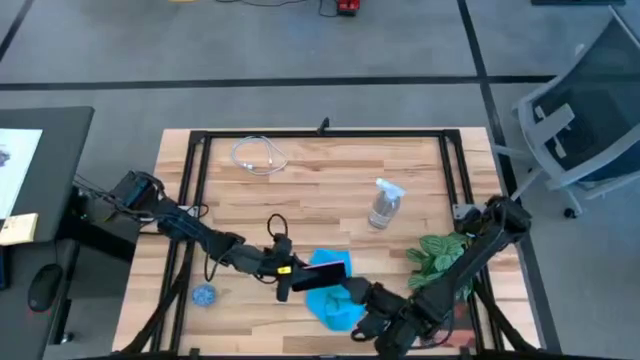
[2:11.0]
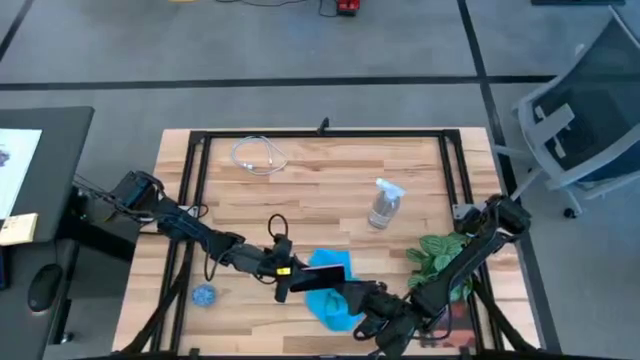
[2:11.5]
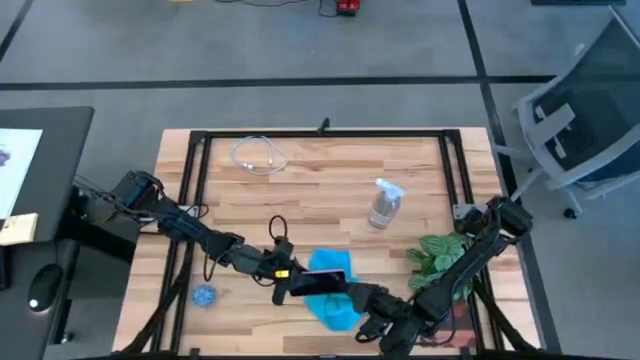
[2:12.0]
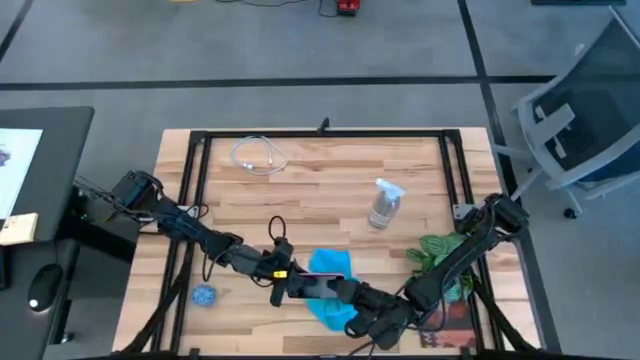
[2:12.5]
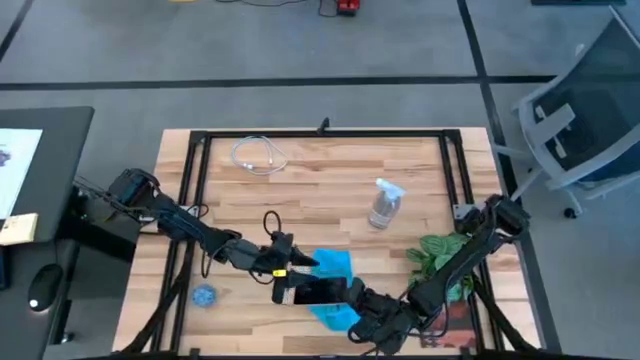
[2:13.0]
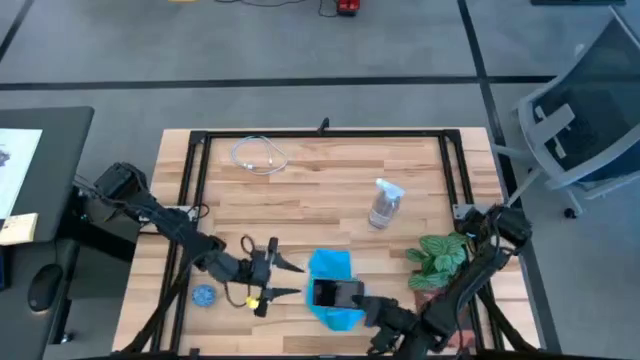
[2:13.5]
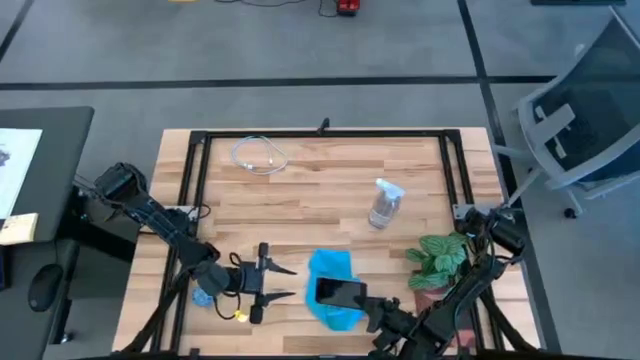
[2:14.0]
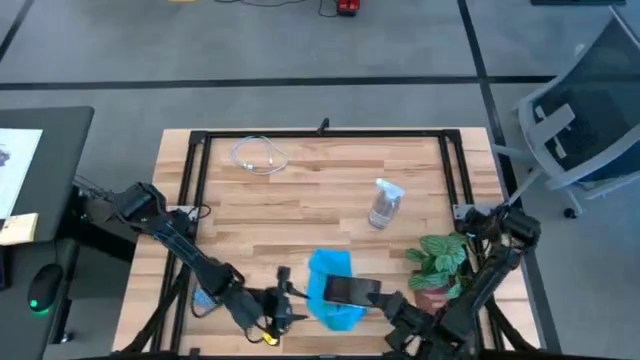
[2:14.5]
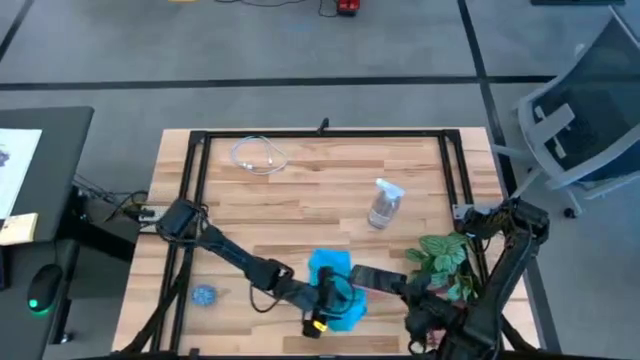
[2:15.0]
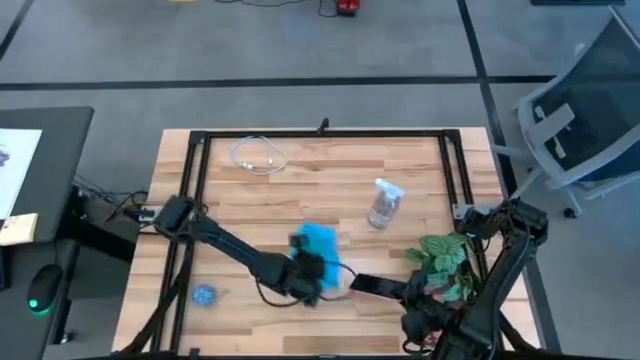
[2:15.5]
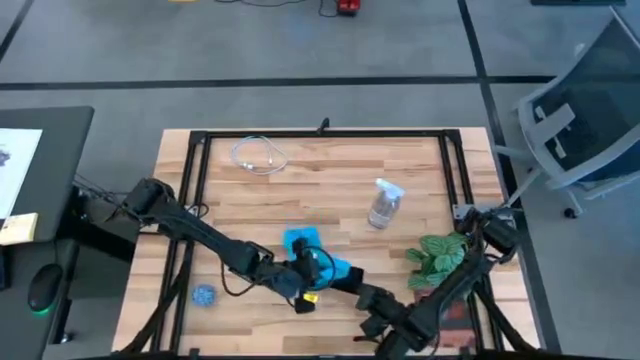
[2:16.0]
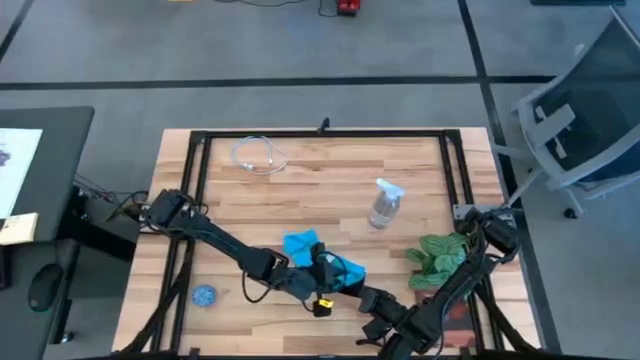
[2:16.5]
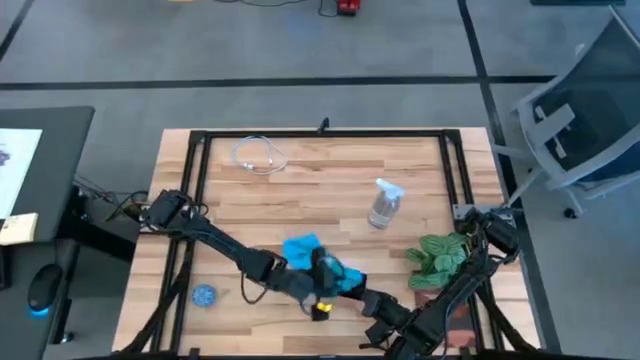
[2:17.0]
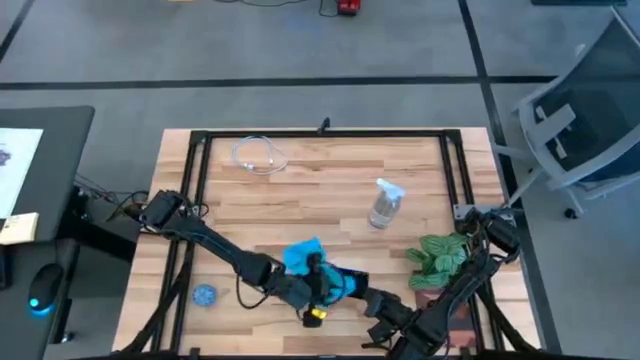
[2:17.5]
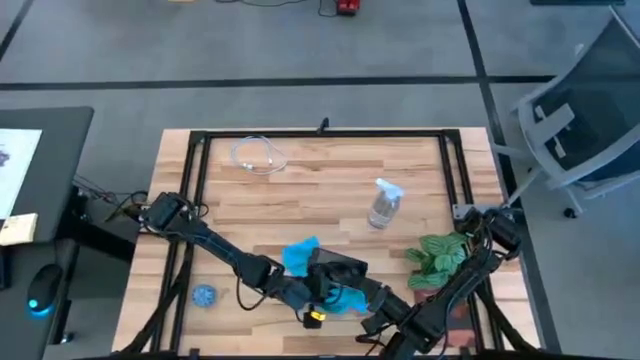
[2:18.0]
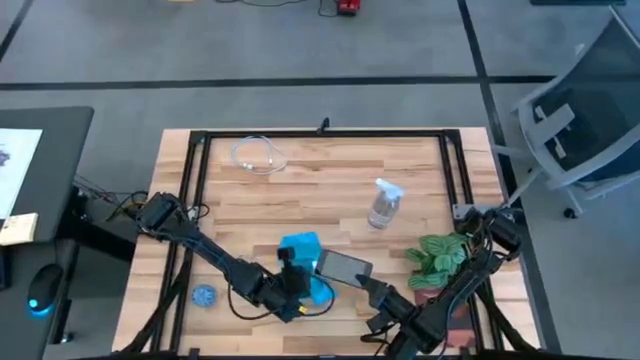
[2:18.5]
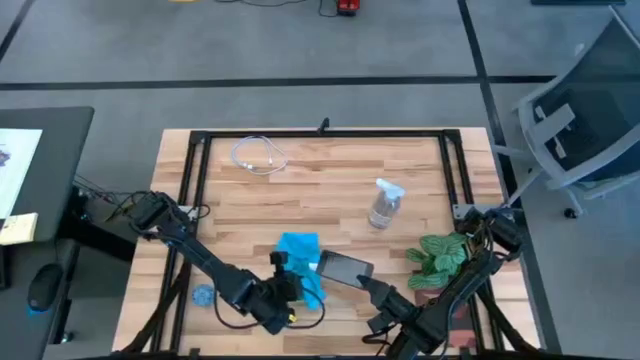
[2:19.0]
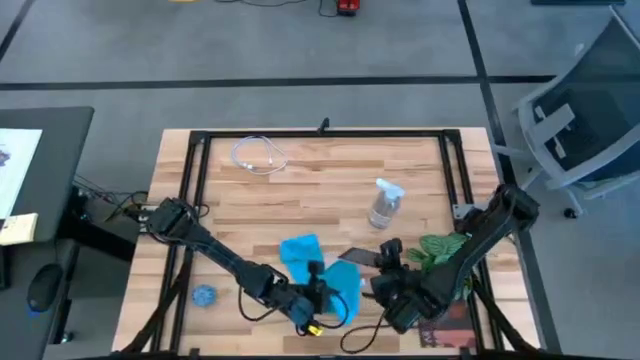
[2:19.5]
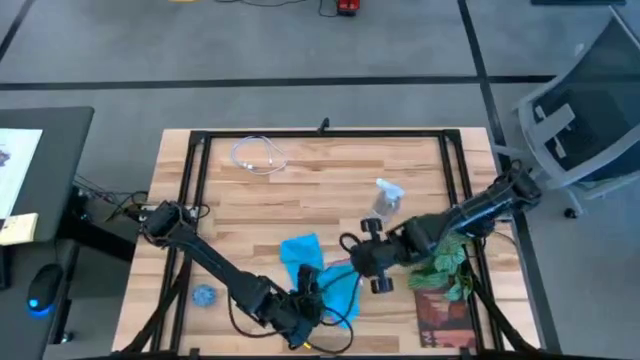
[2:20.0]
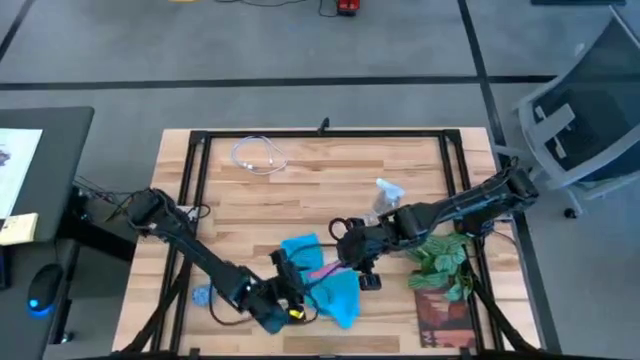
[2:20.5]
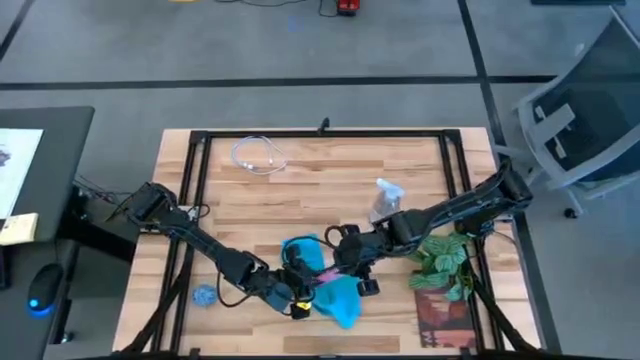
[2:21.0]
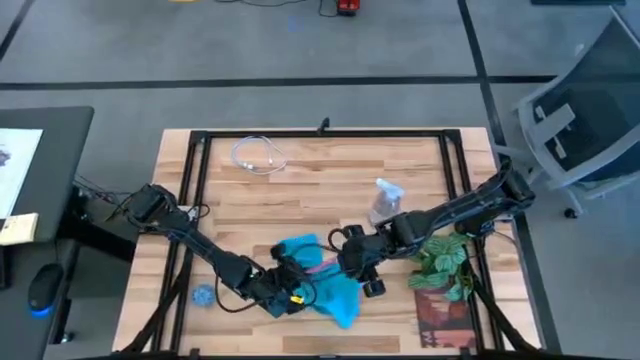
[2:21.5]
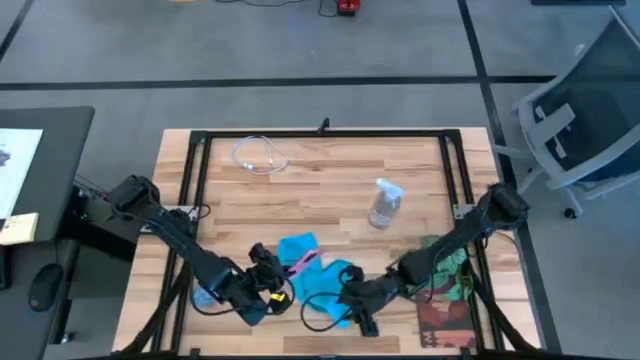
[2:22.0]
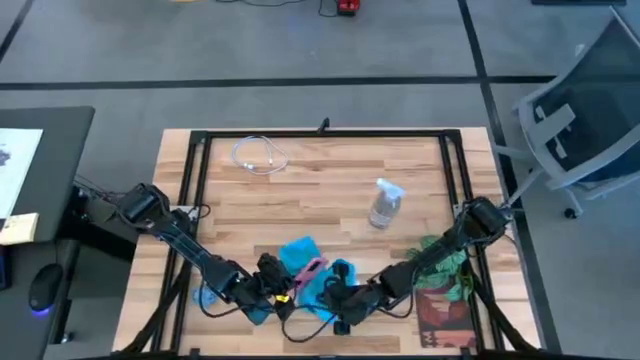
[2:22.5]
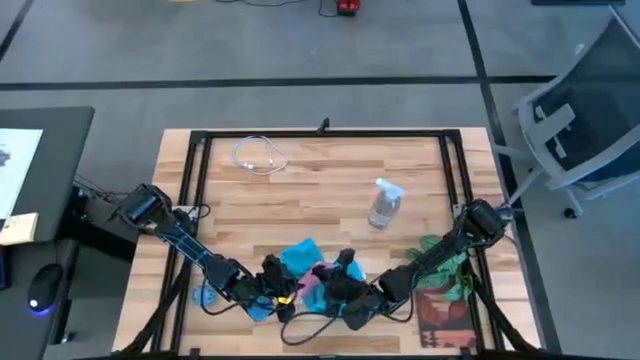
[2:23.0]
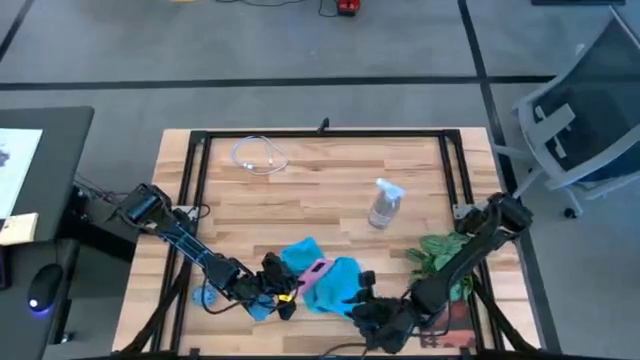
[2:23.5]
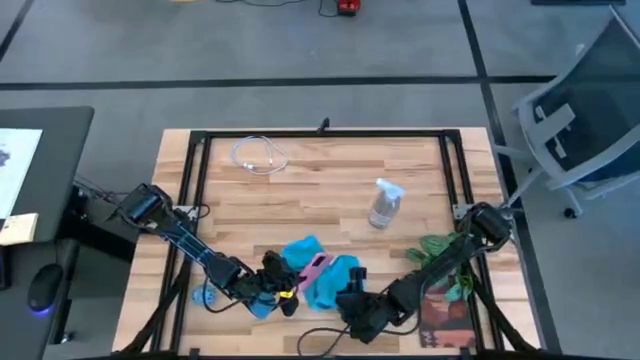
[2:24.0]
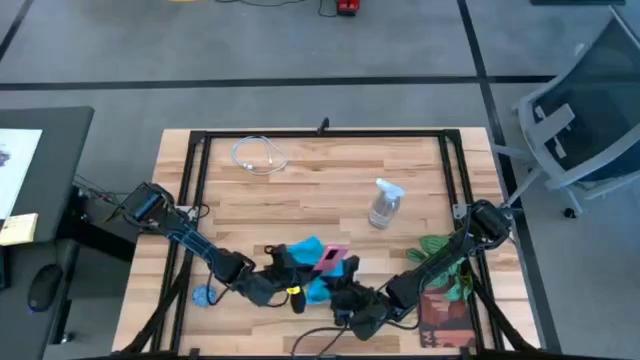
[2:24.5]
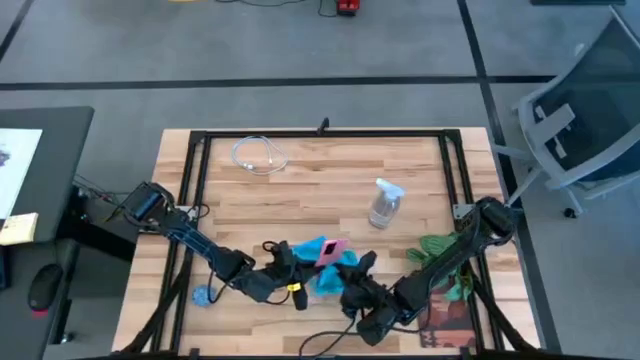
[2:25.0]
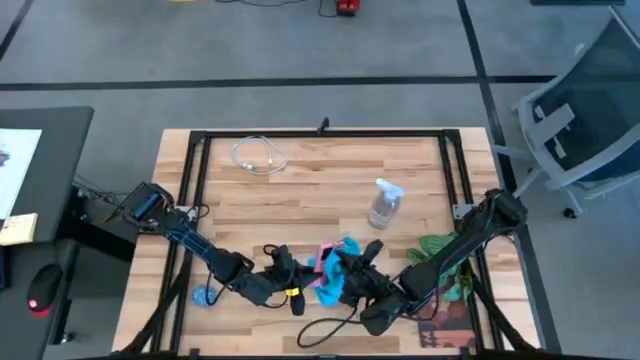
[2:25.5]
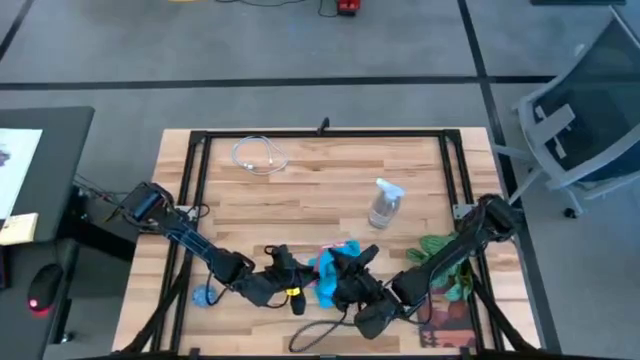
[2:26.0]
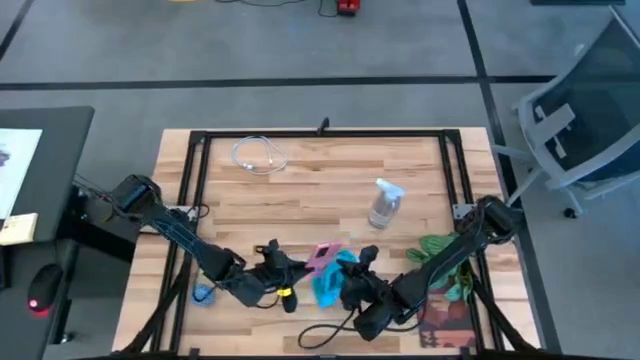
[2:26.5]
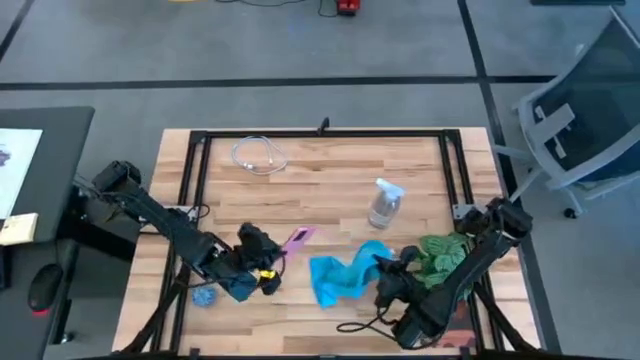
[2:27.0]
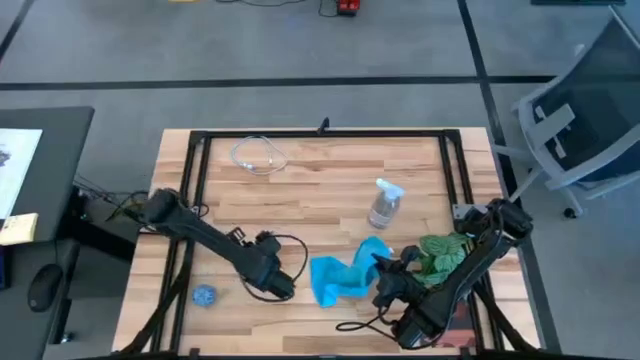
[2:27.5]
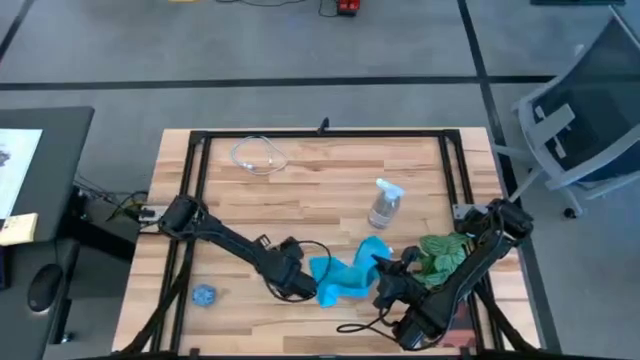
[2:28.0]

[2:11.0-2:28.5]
Task: Apply microfiber cloth
Wipe the front of the cellphone with a microfiber cloth

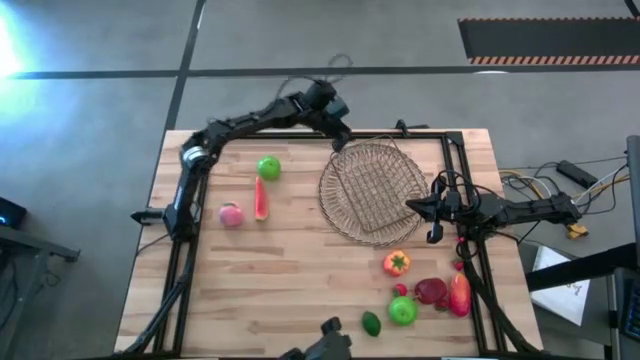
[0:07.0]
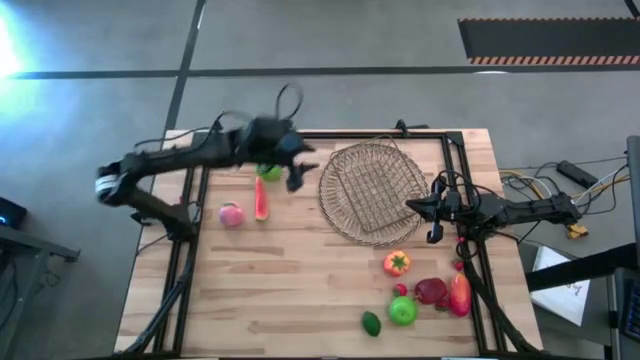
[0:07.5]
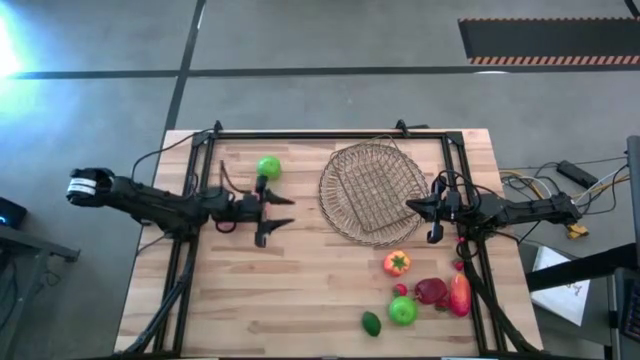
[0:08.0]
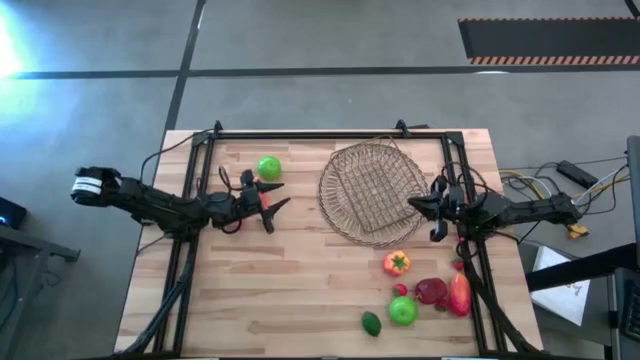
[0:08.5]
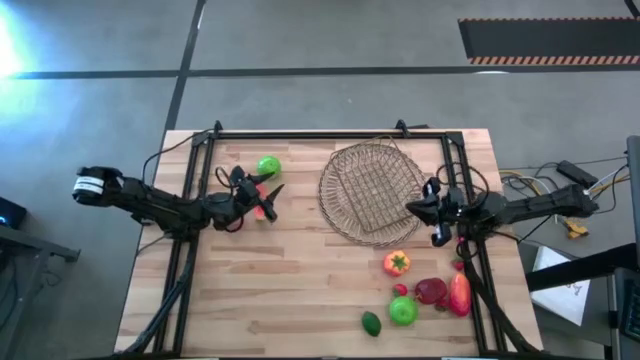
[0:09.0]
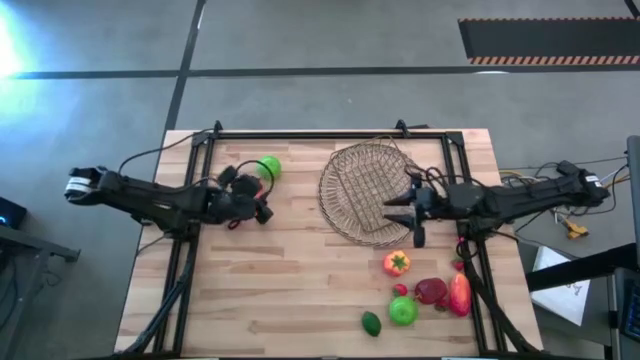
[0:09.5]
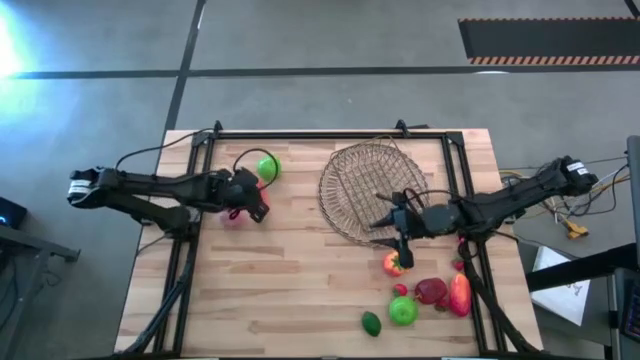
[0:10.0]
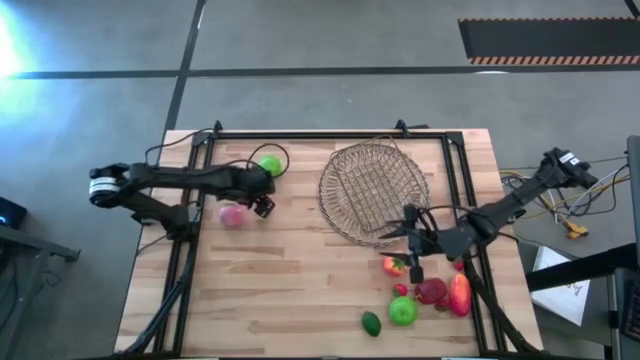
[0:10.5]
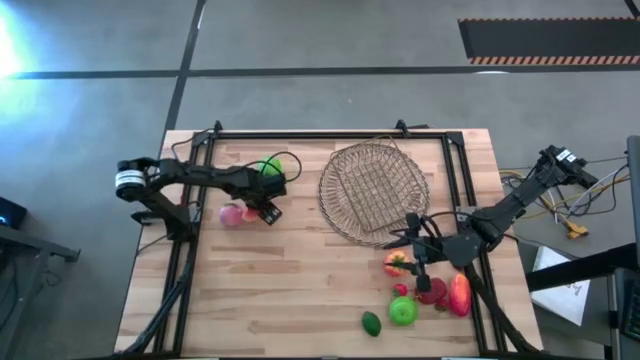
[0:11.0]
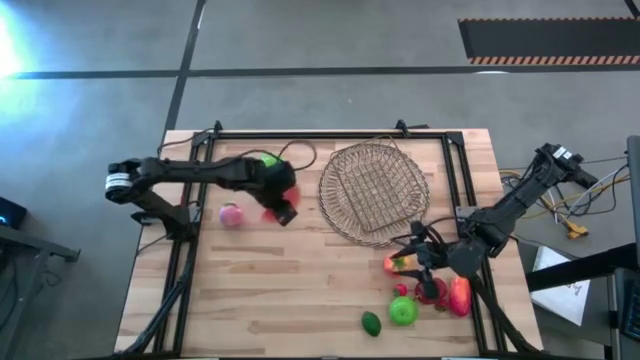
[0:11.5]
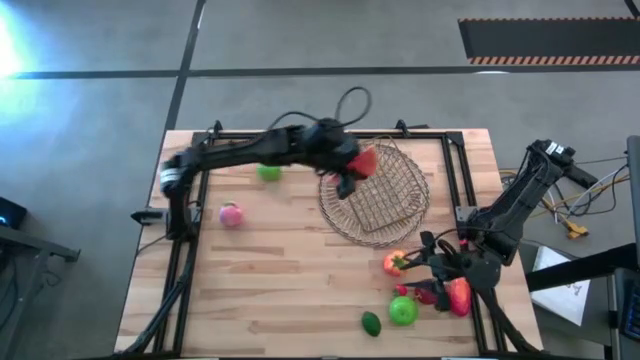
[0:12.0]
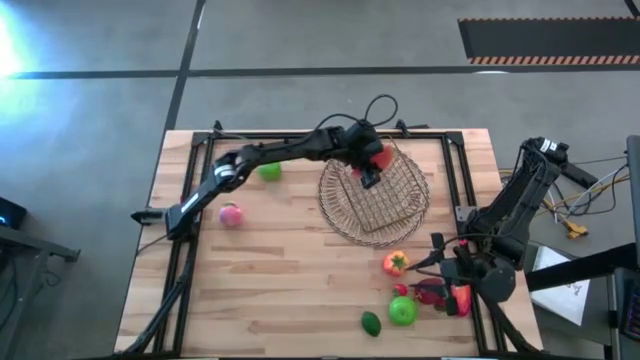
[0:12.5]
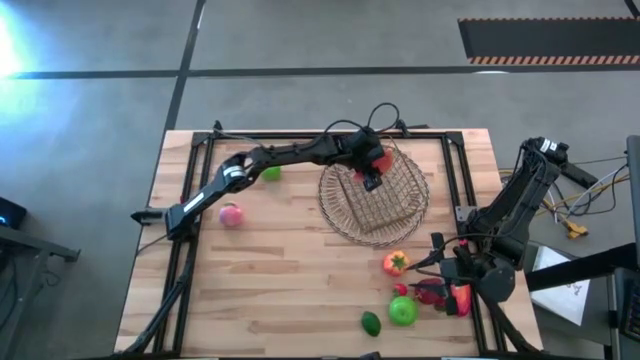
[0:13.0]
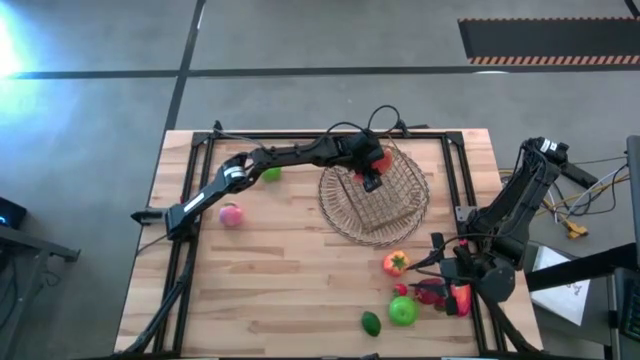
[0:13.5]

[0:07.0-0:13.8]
Task: Build produce basket
Put the sliced green watermelon into the gold mesh basket
